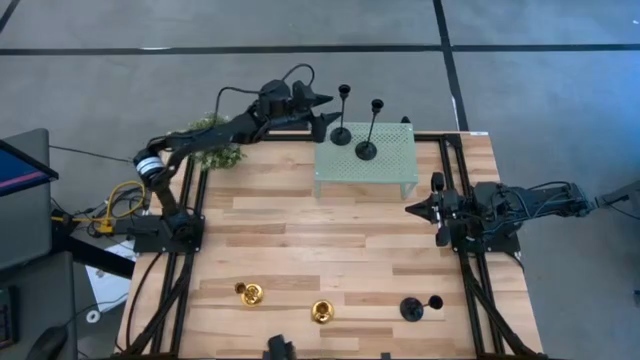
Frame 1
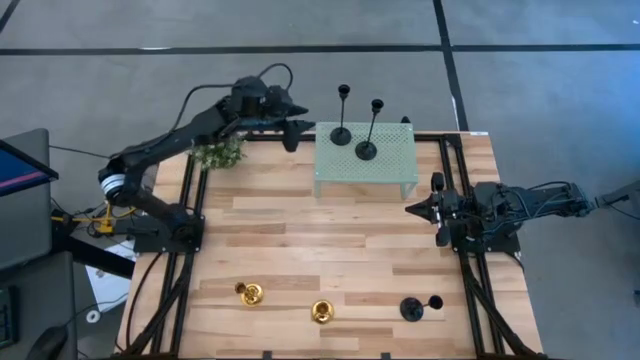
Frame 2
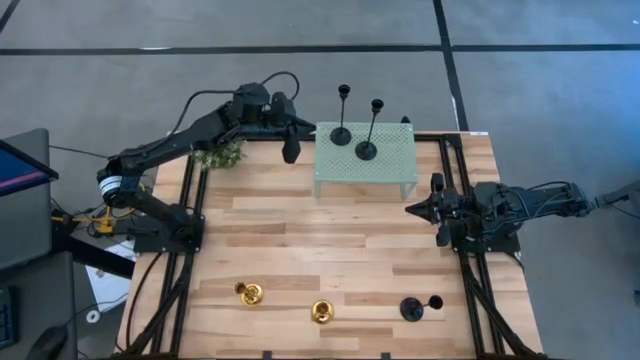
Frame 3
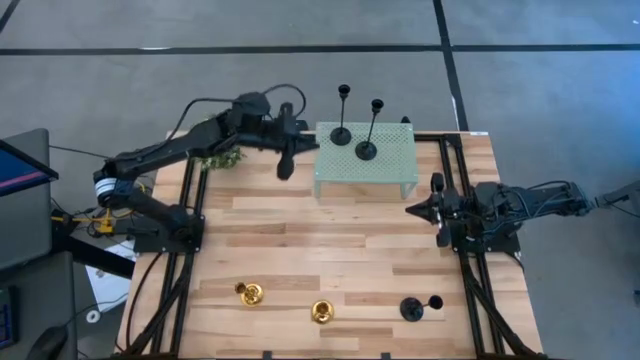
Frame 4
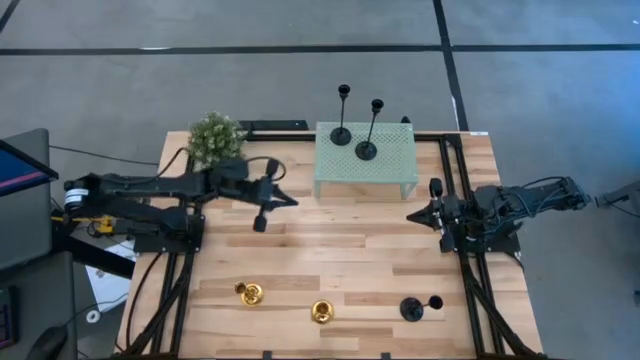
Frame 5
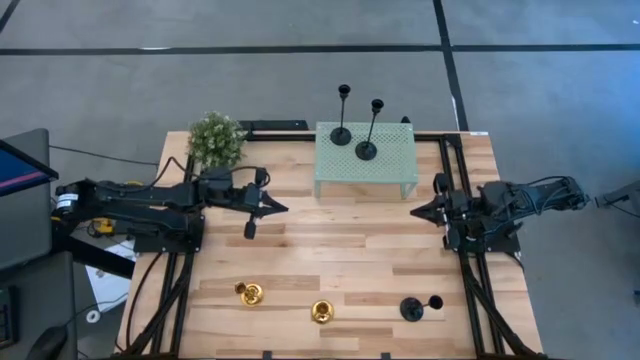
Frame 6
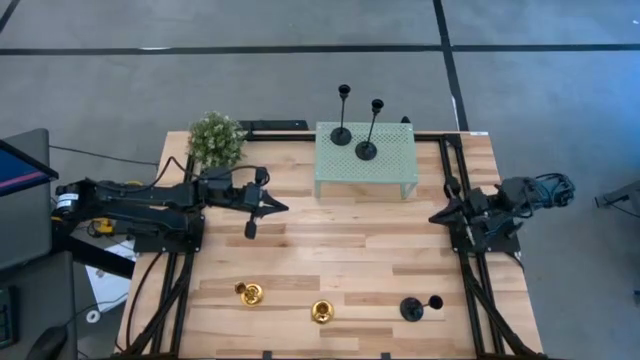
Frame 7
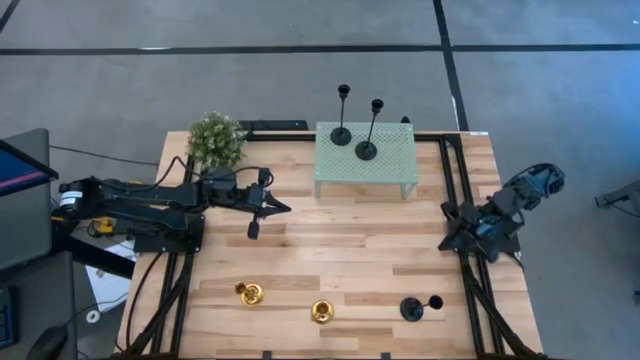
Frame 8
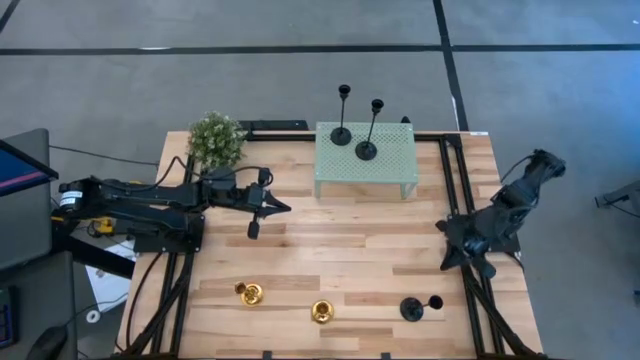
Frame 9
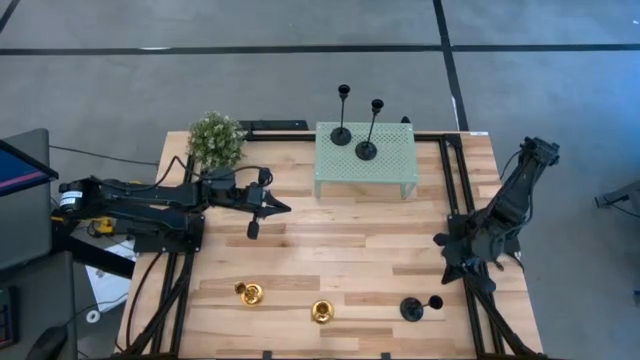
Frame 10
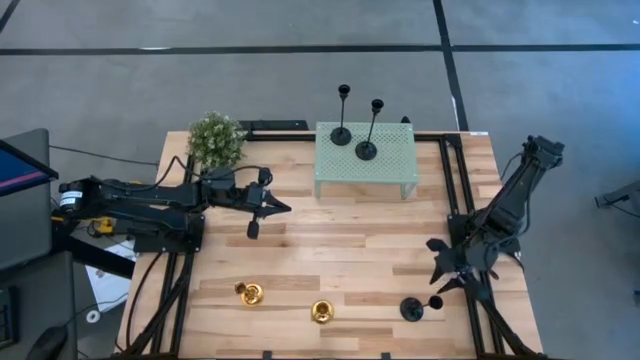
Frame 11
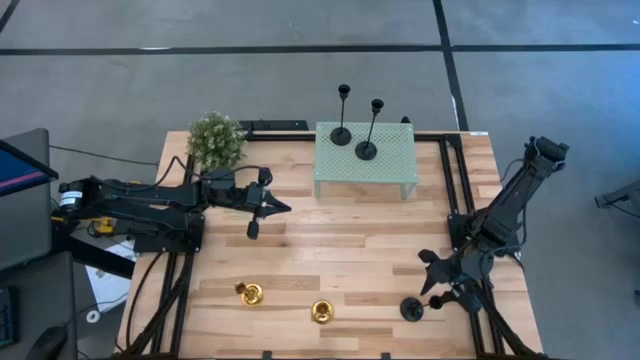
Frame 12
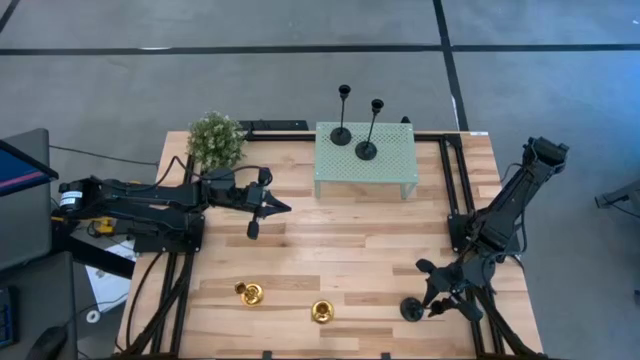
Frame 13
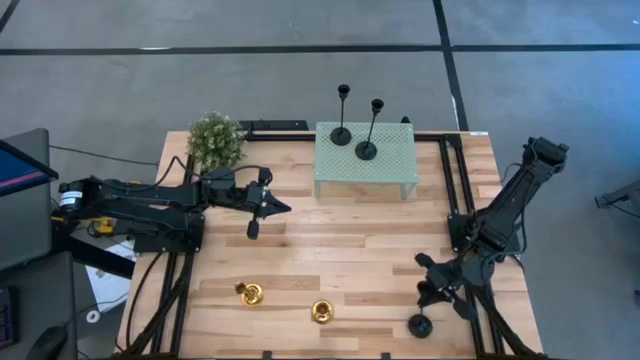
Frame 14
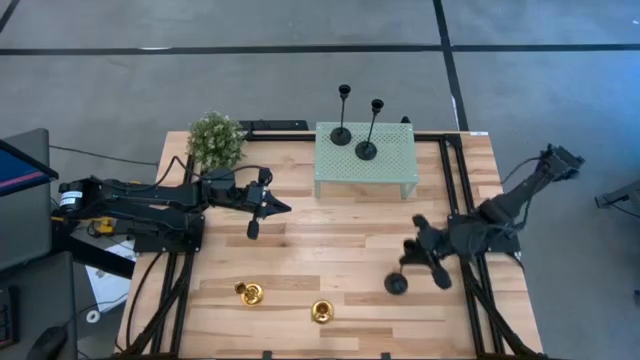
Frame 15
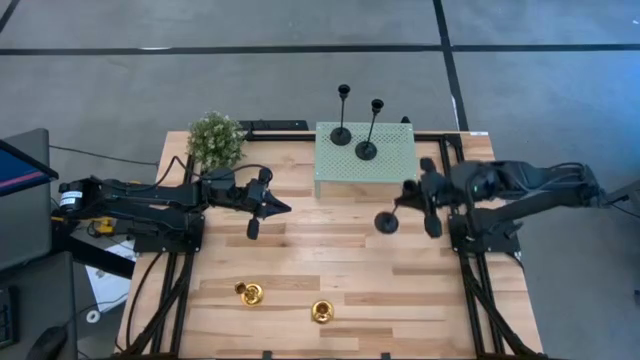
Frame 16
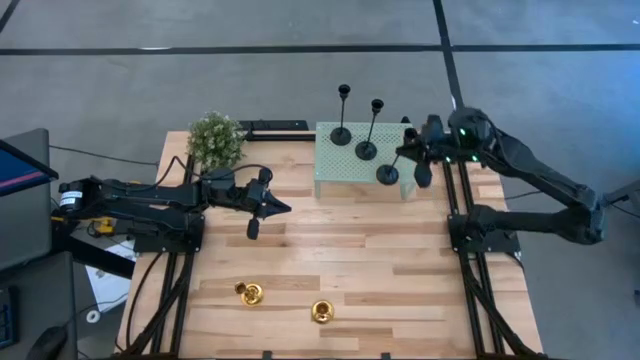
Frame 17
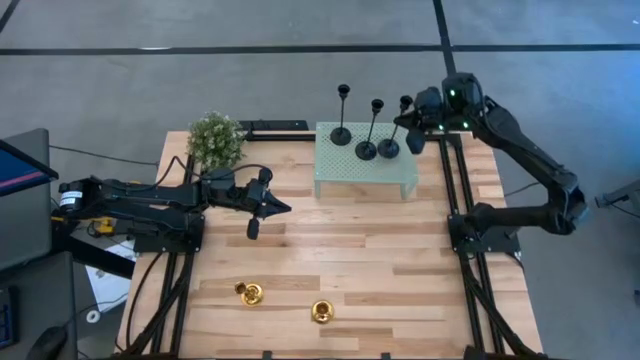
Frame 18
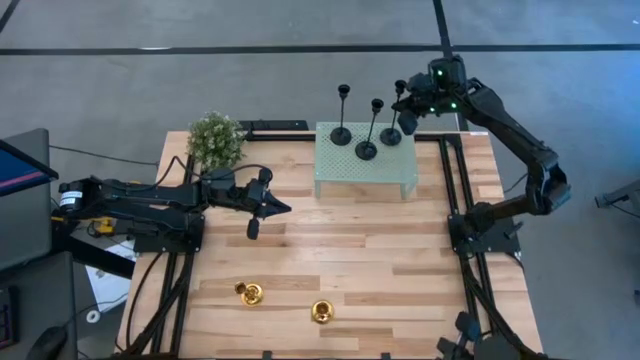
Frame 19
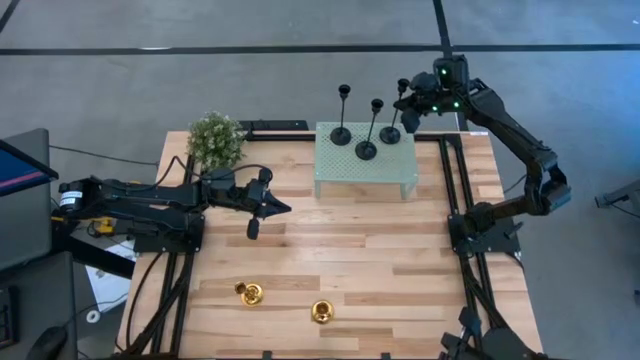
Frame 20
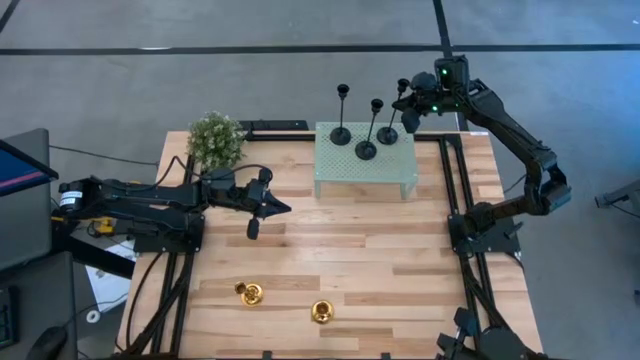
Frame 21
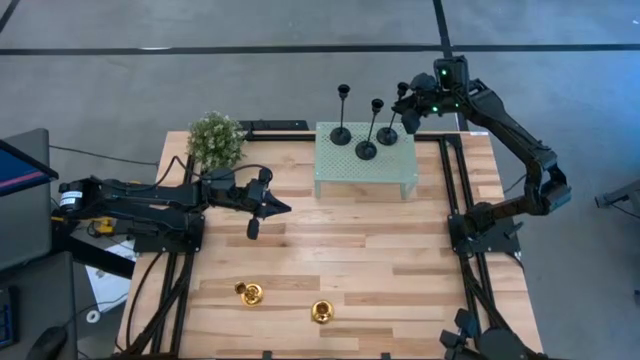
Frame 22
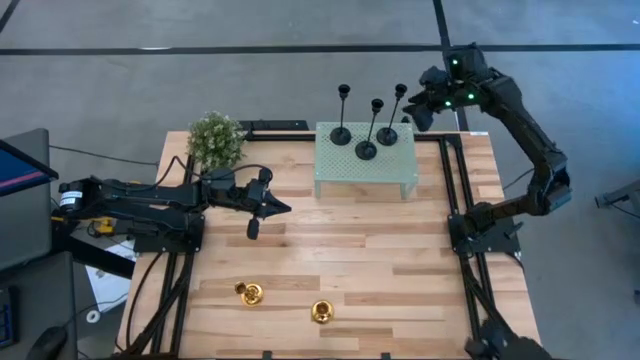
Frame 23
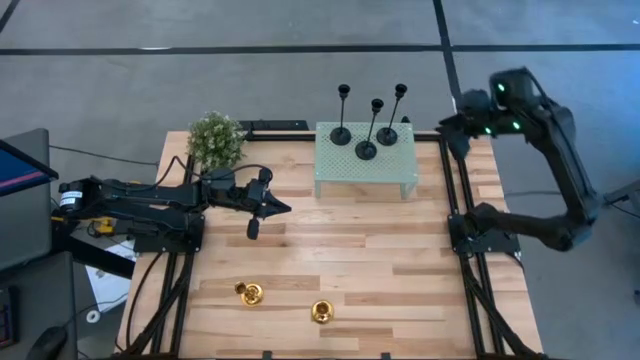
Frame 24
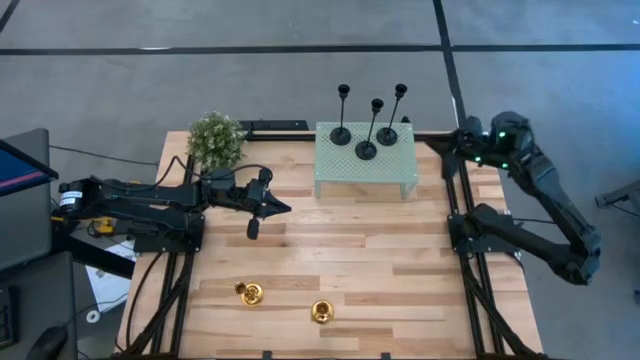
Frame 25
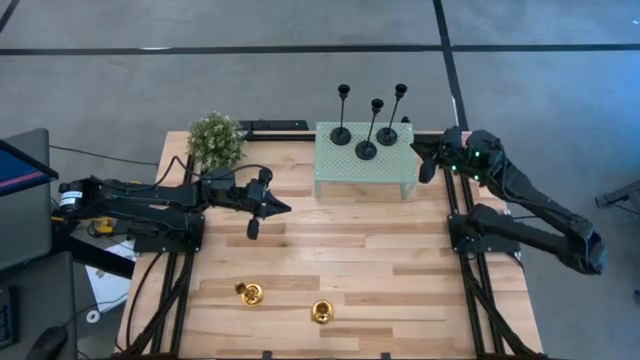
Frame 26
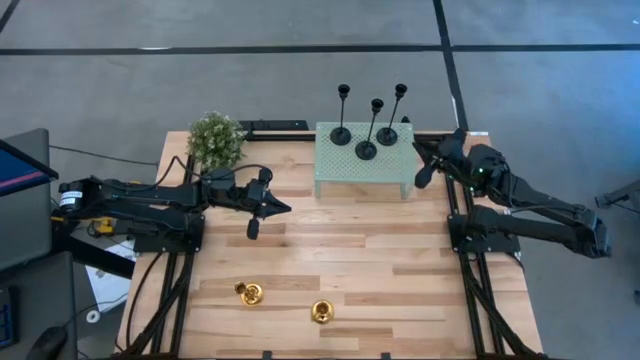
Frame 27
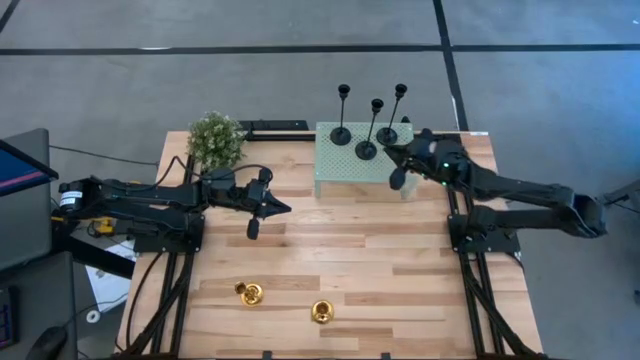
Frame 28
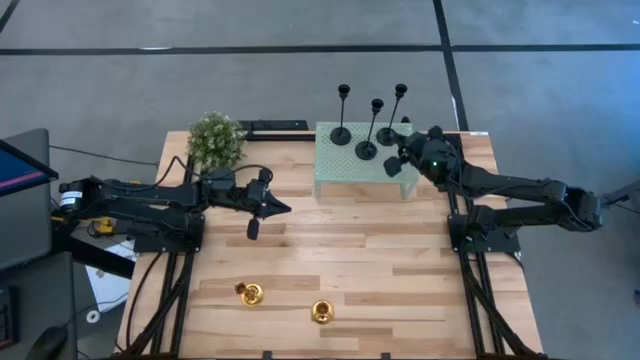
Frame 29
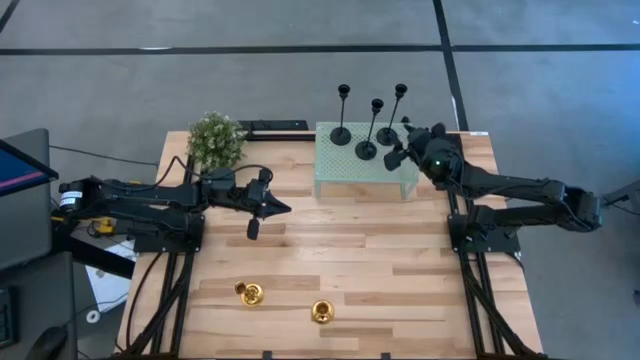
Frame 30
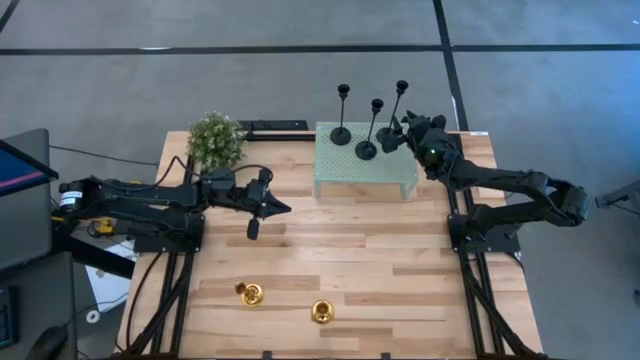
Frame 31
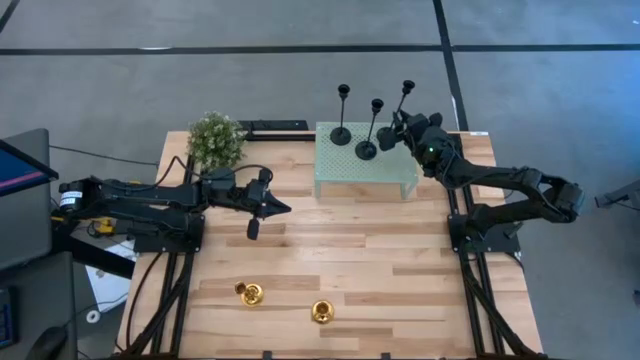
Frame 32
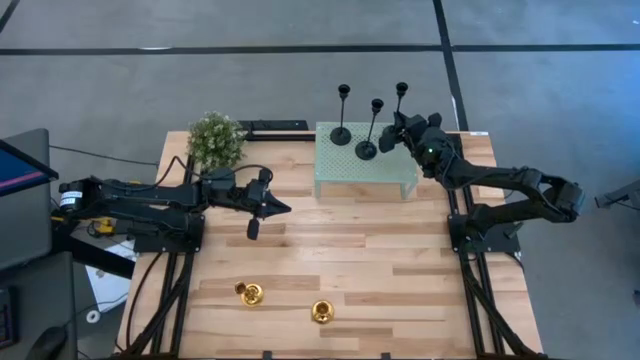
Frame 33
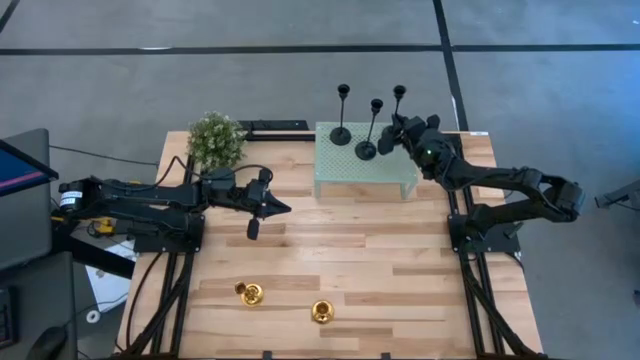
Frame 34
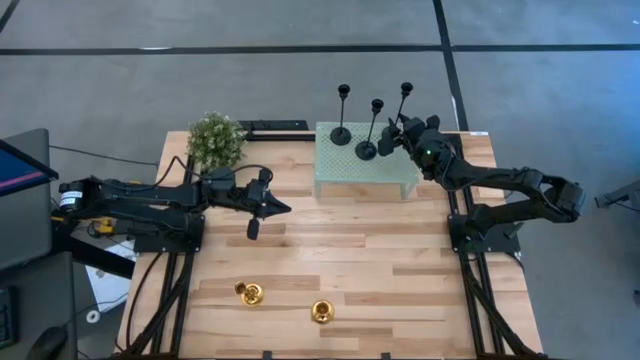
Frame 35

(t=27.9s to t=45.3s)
Task: Pick & Place candle stick holders
Put the black candle holder on the shelf

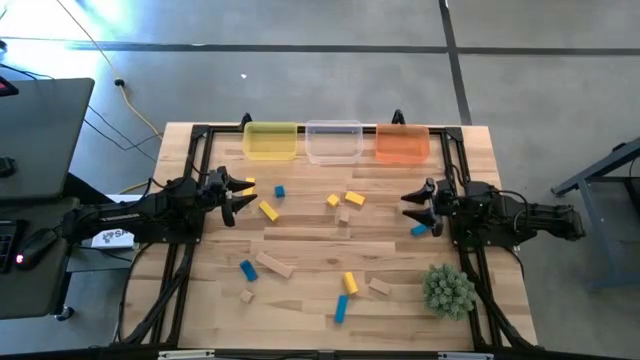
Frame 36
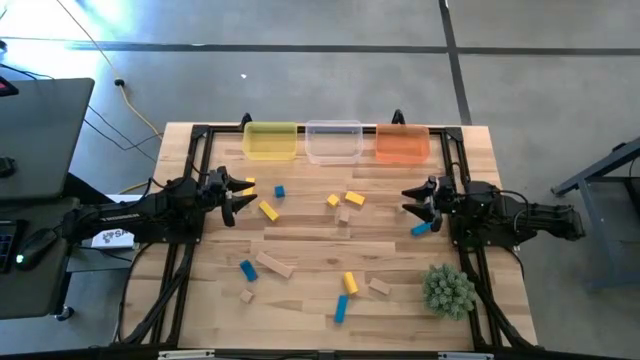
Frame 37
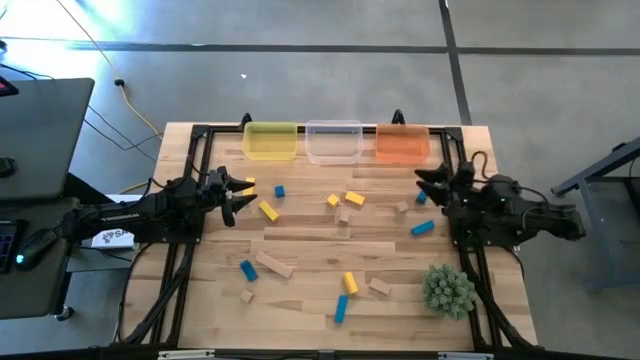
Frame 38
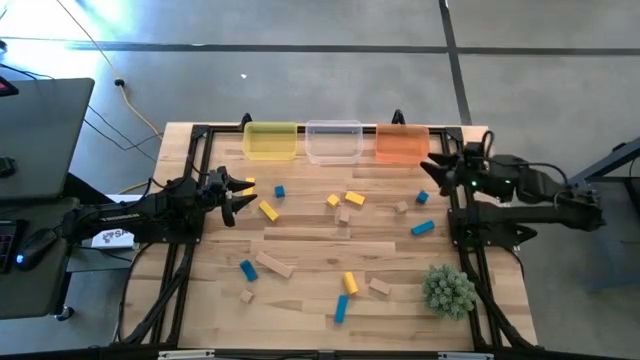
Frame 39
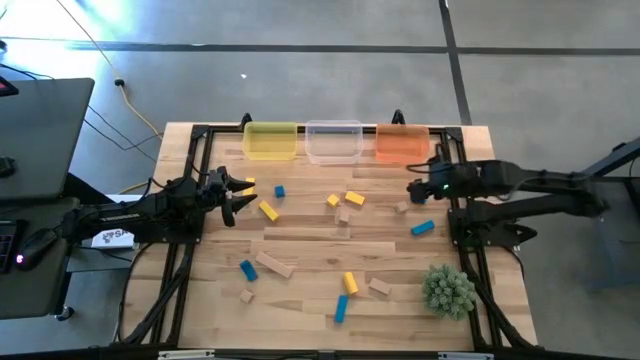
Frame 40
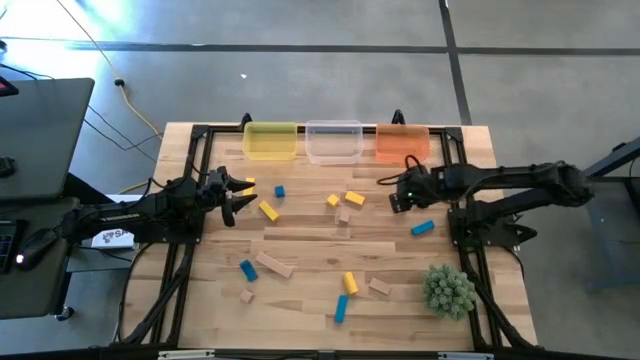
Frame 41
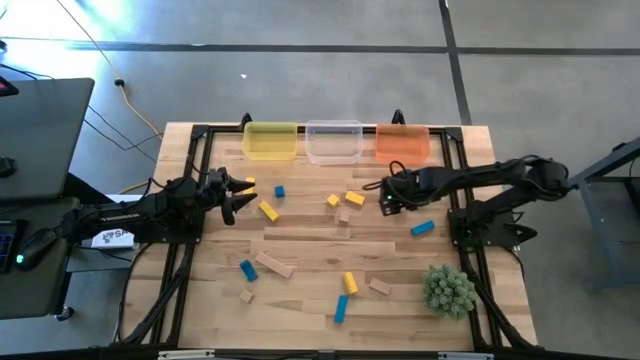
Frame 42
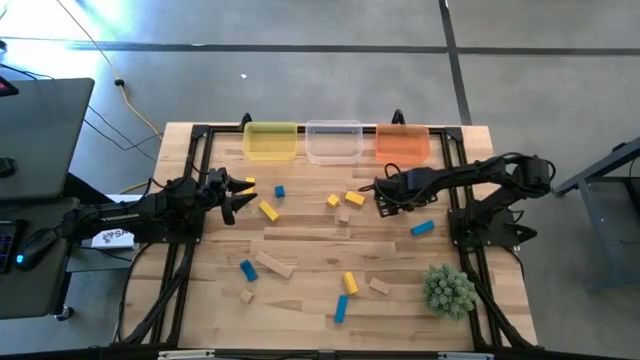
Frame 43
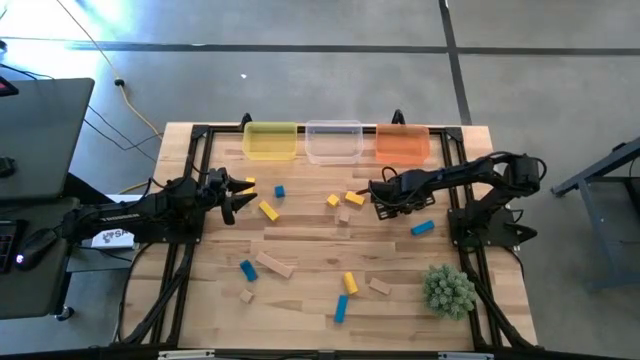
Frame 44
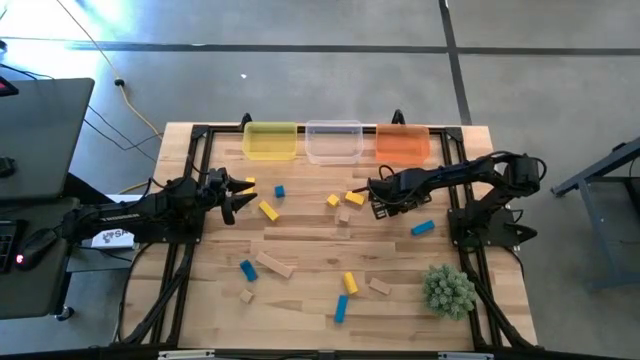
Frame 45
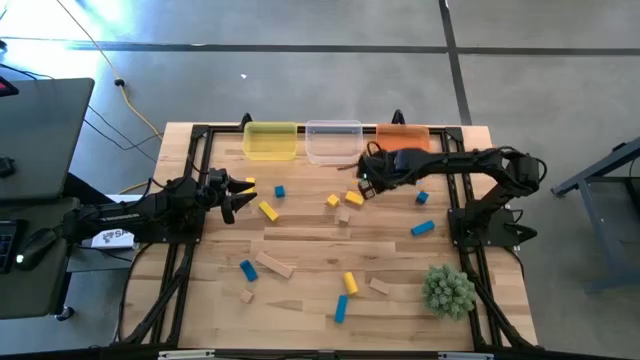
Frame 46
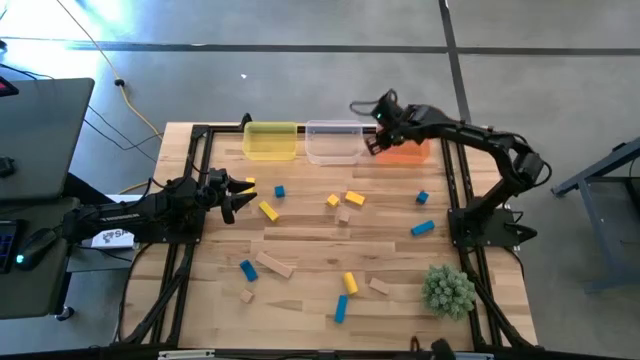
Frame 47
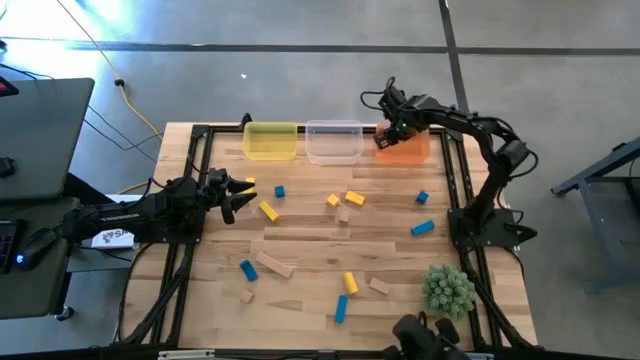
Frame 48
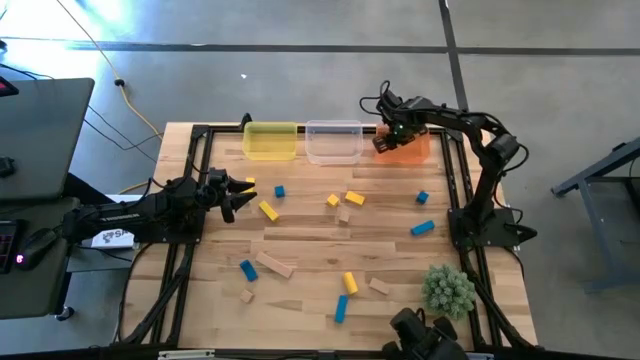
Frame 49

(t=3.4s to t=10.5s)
Task: Sort & place blocks by color
Put the brown block into the orange bin
